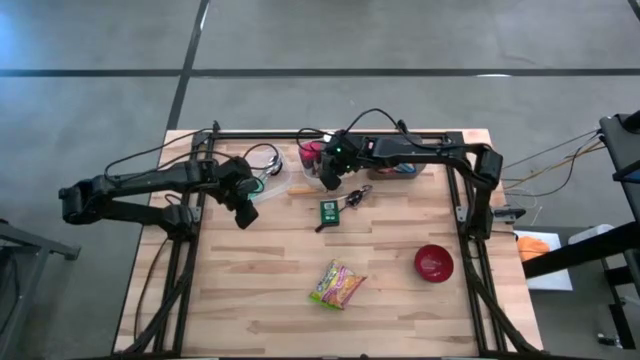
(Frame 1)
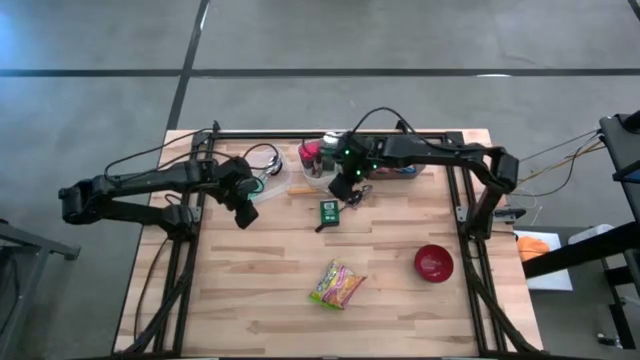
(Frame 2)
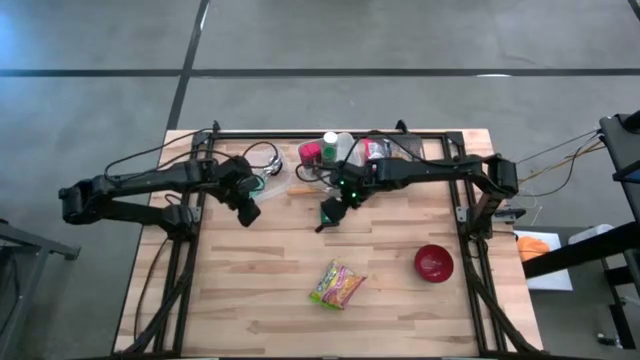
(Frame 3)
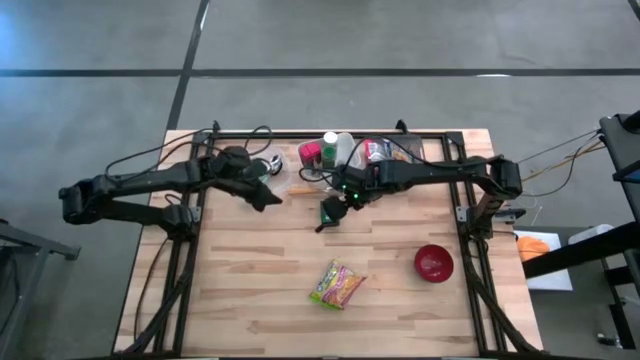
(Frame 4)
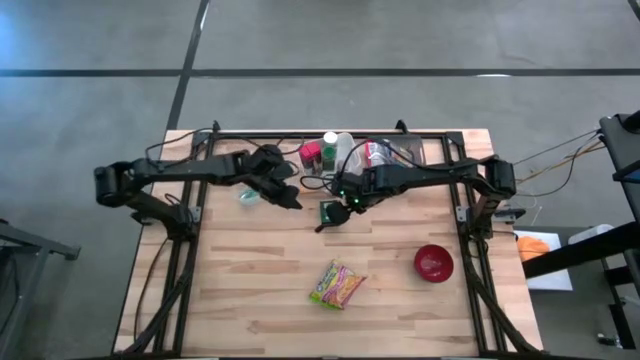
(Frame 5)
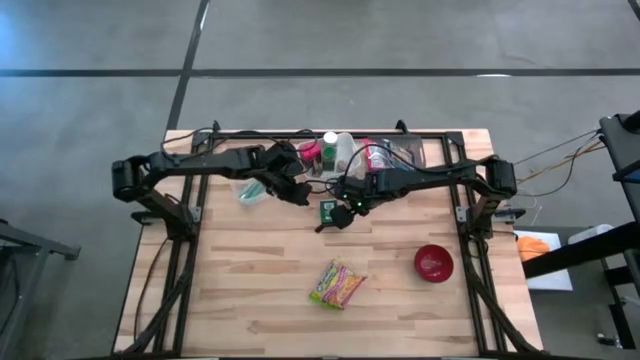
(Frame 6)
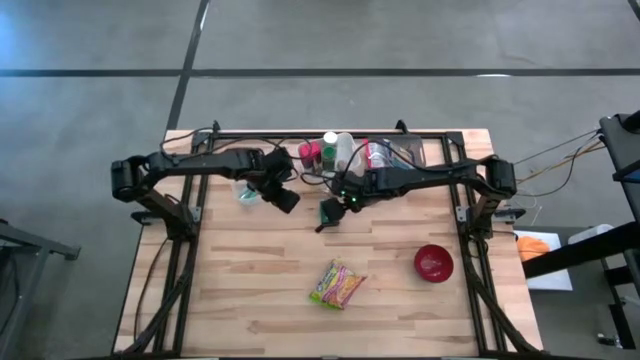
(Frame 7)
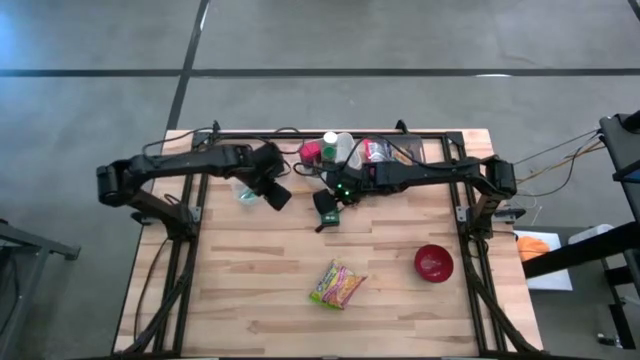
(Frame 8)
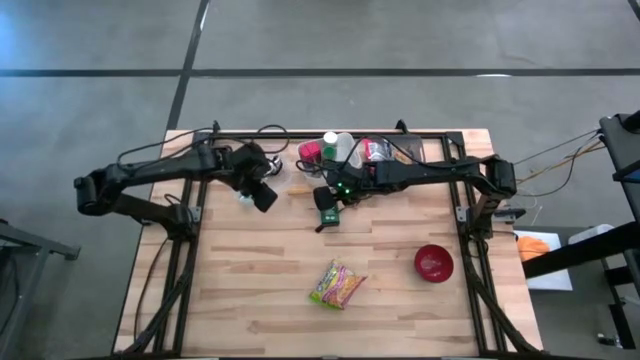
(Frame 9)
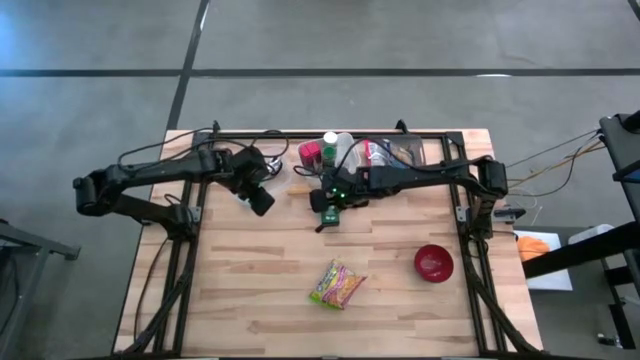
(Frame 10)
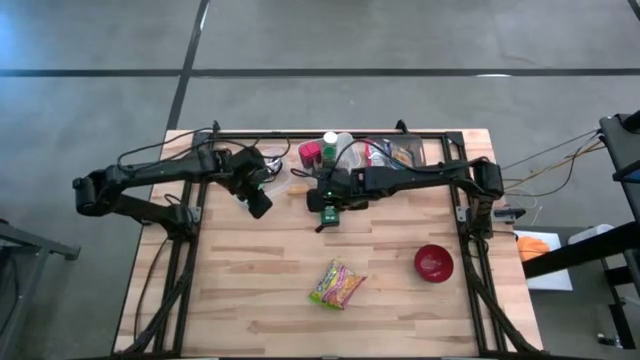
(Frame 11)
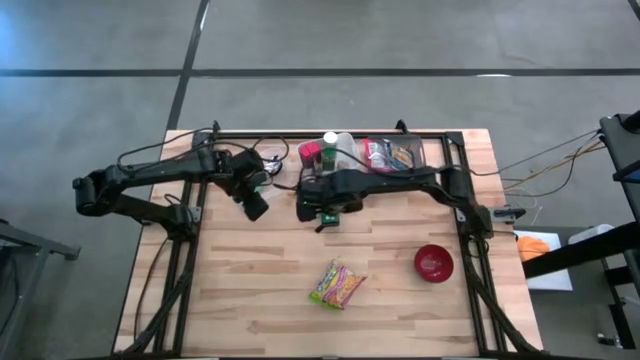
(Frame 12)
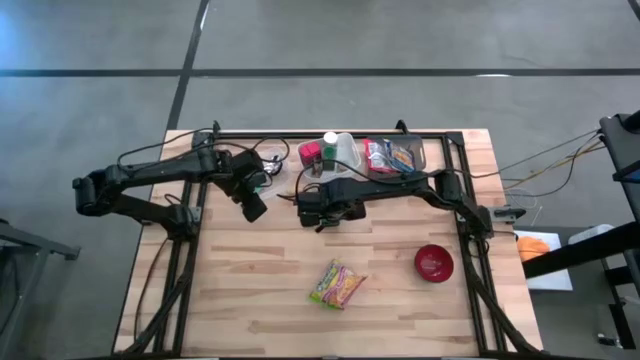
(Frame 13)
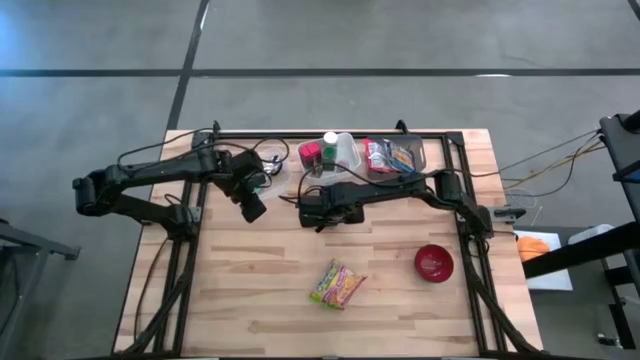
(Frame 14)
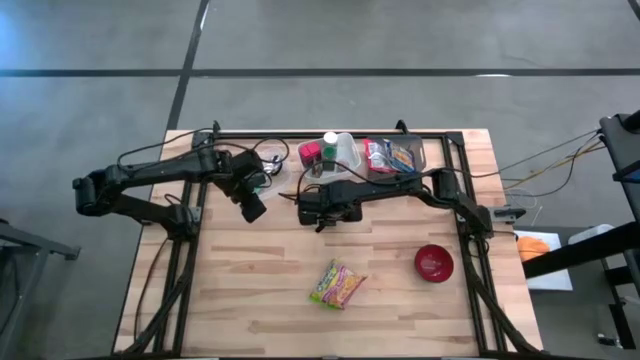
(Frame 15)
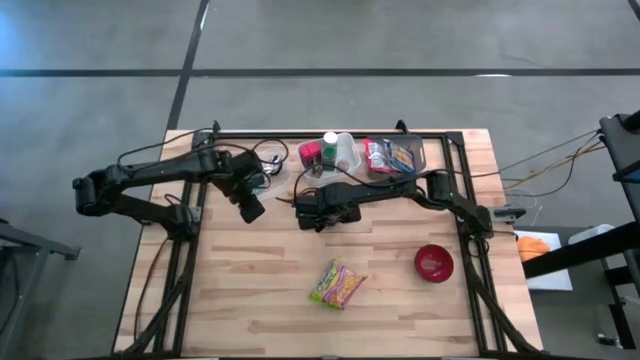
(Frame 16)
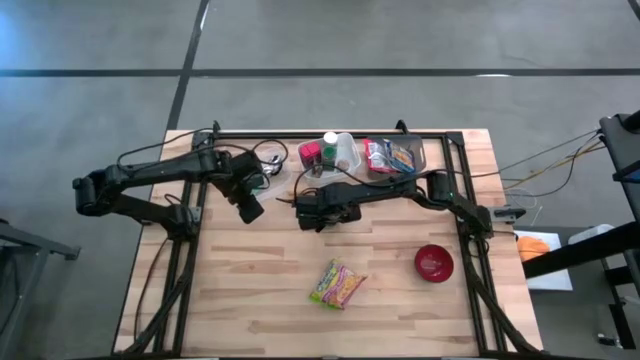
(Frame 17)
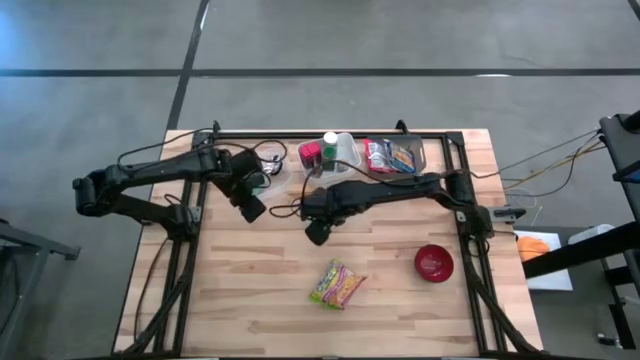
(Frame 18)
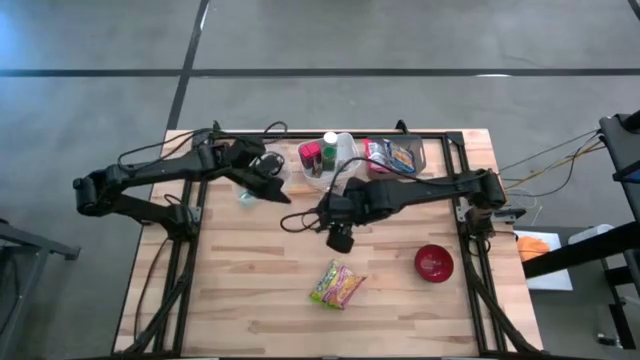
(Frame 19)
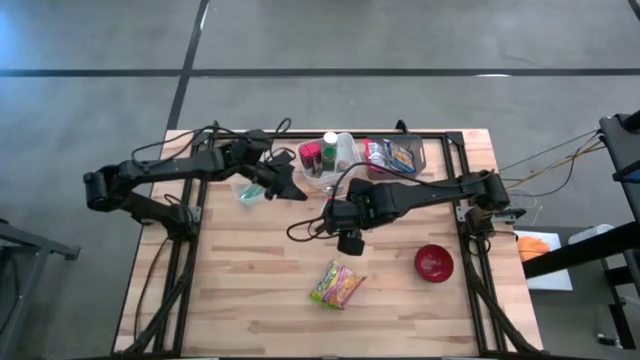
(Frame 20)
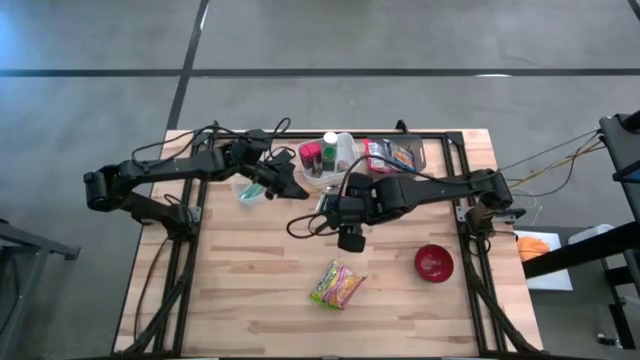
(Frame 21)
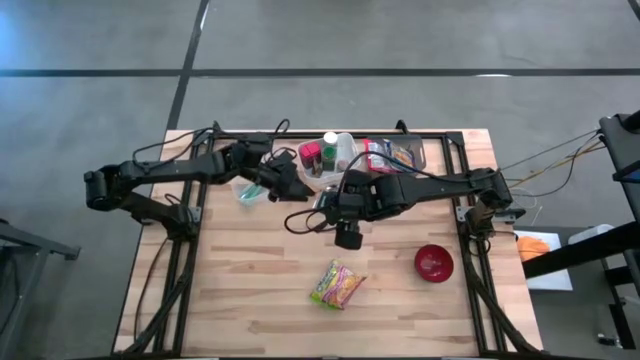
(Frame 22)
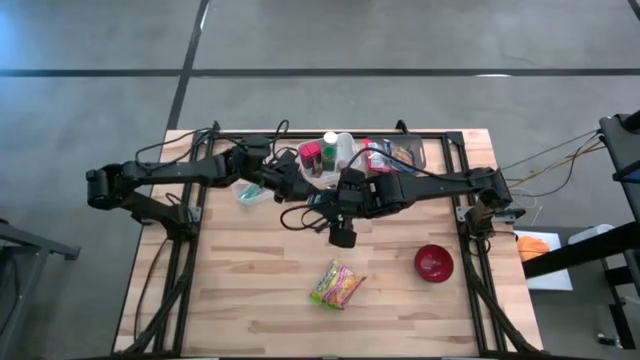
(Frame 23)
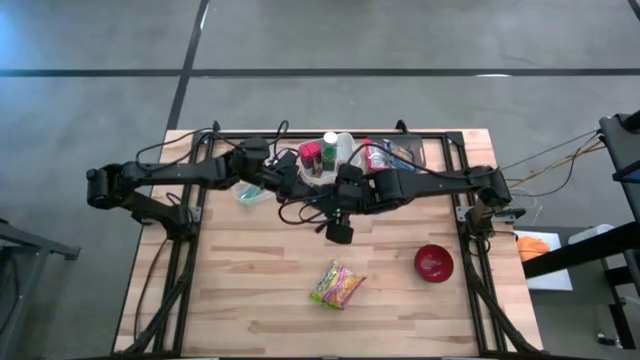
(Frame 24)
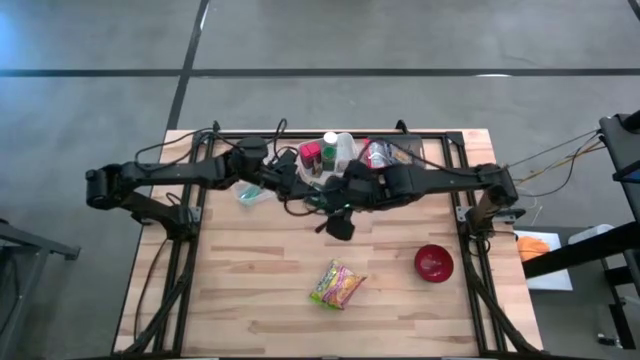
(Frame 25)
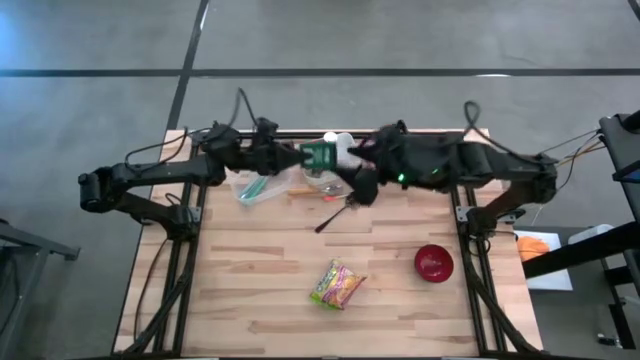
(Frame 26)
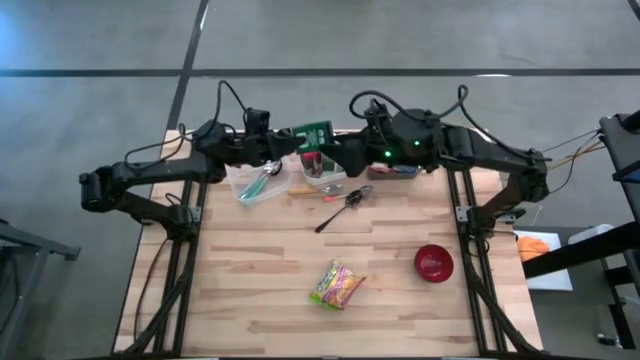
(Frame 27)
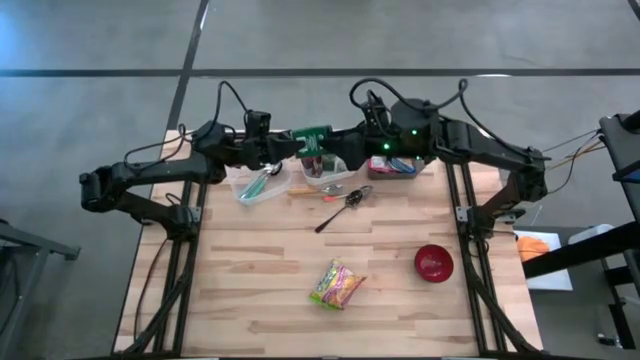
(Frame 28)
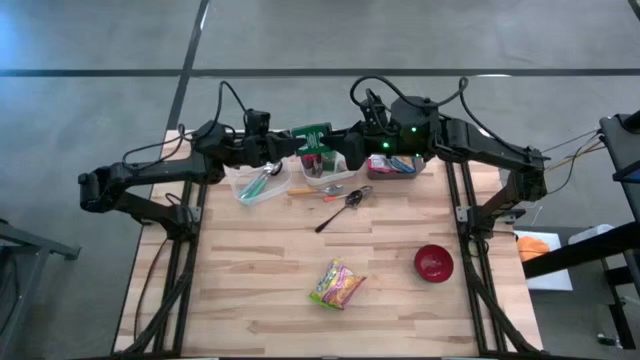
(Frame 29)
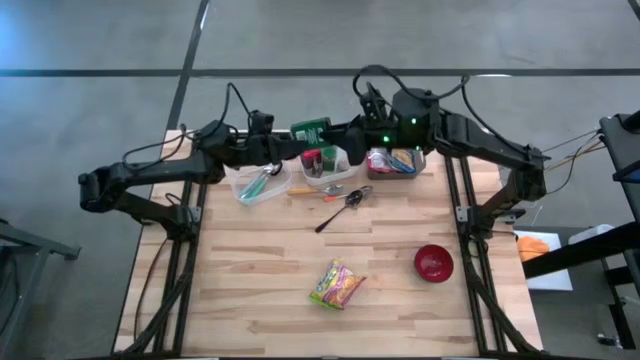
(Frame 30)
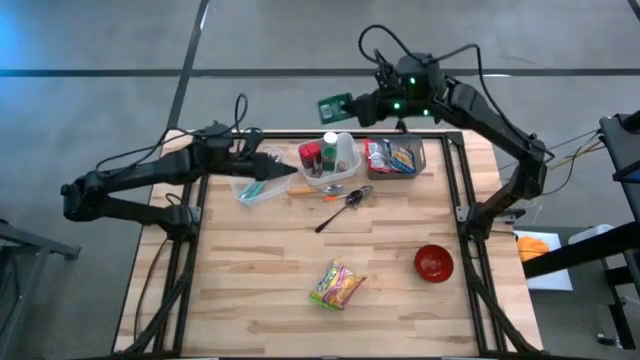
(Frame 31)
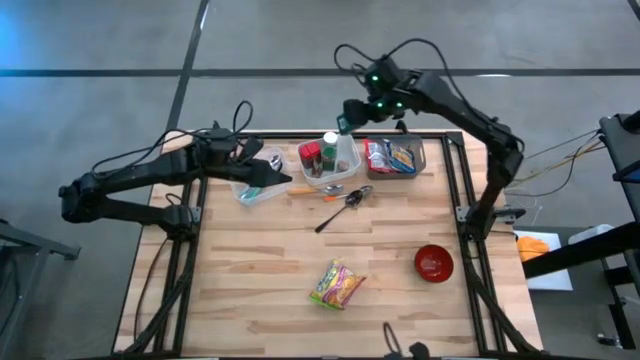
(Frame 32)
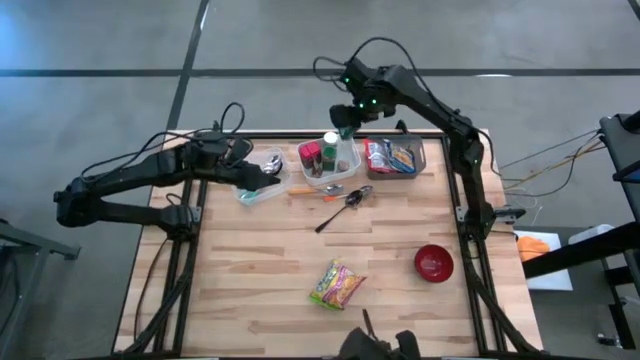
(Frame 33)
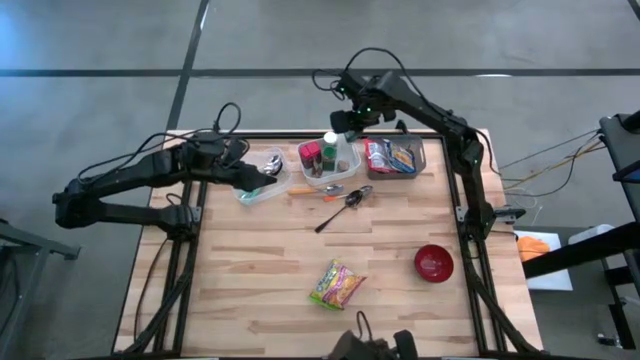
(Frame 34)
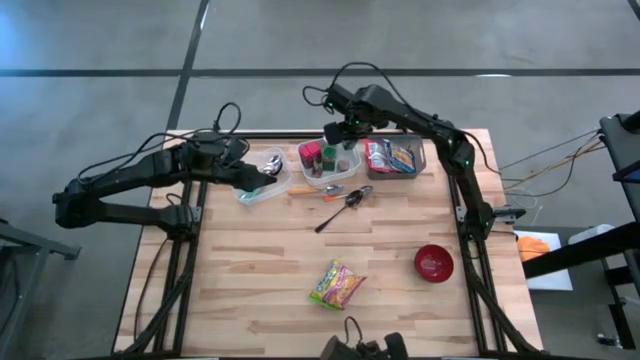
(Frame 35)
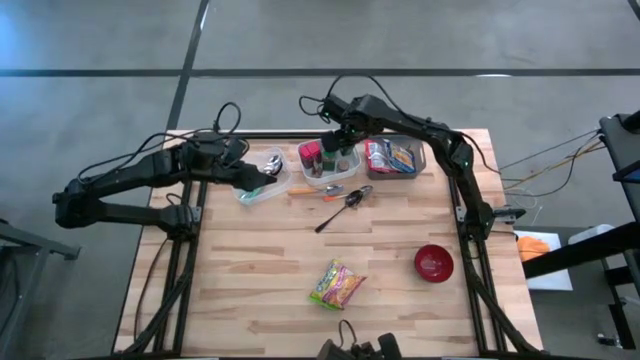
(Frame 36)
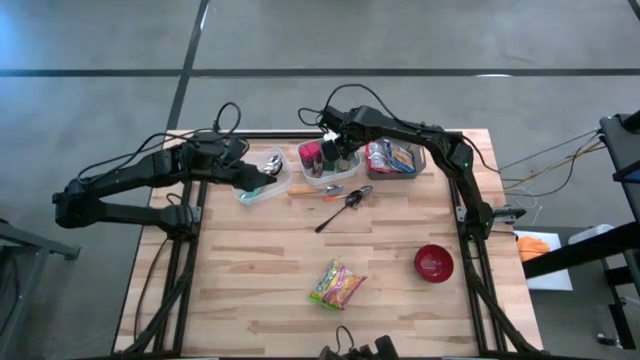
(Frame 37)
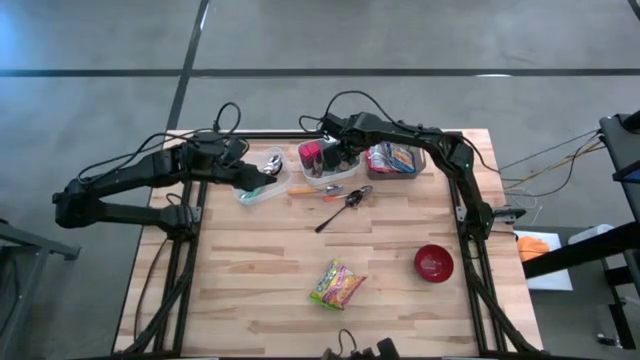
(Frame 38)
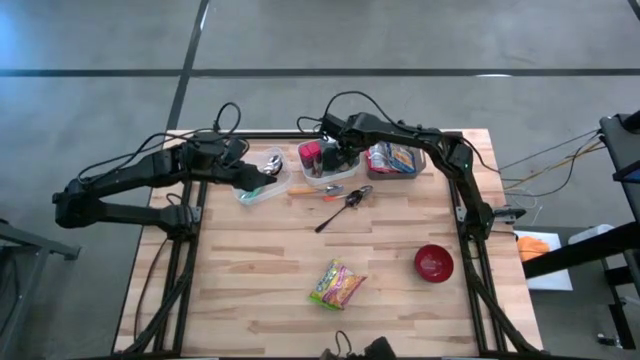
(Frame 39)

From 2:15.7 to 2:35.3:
Put the black seasoning can into the white bin
